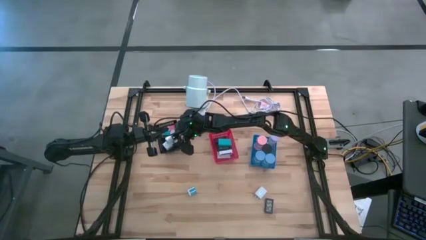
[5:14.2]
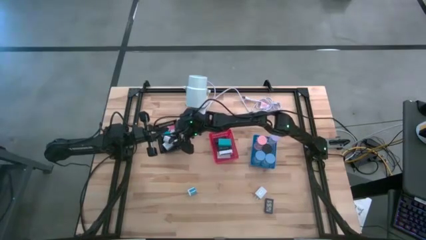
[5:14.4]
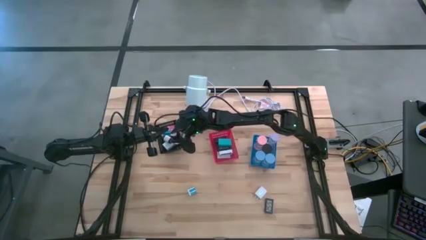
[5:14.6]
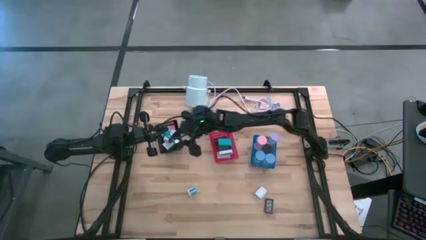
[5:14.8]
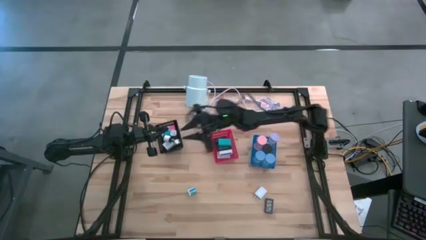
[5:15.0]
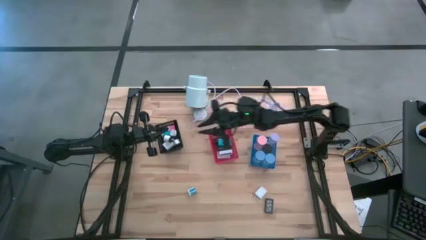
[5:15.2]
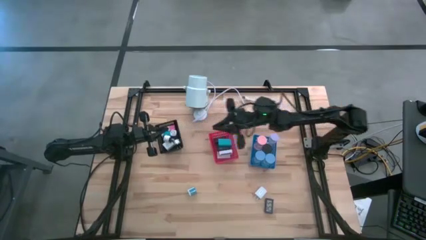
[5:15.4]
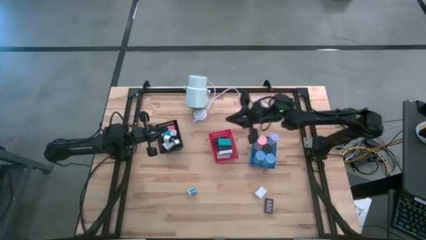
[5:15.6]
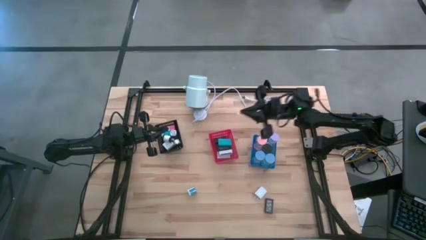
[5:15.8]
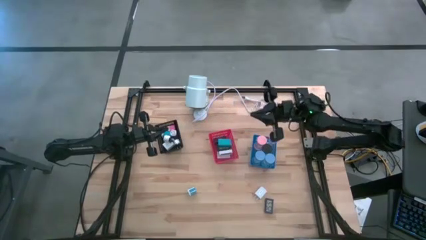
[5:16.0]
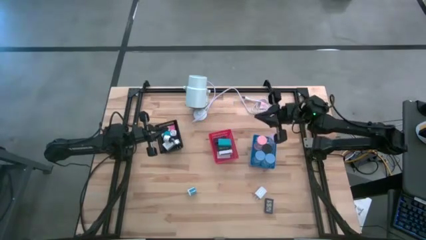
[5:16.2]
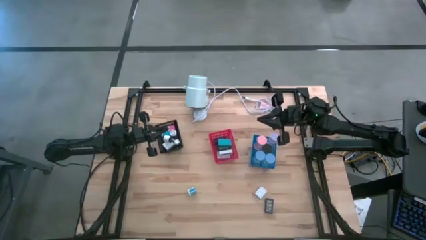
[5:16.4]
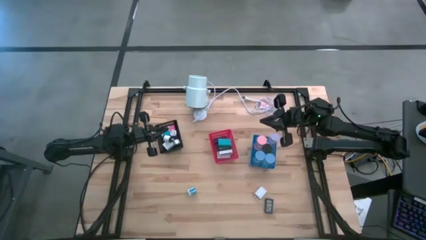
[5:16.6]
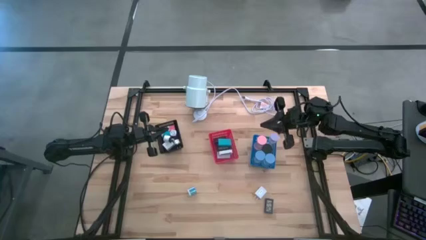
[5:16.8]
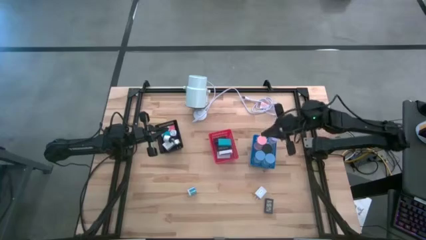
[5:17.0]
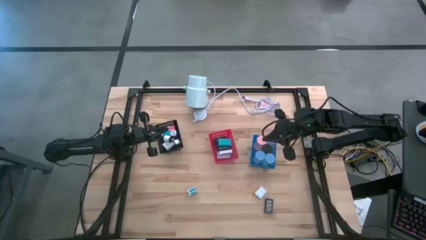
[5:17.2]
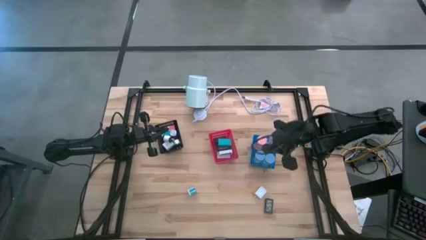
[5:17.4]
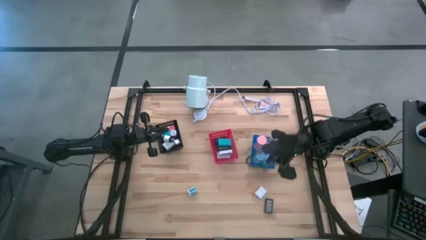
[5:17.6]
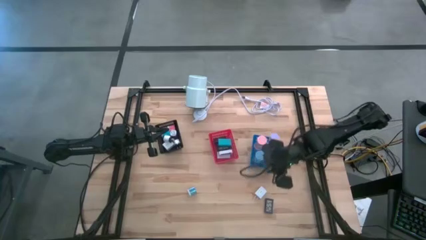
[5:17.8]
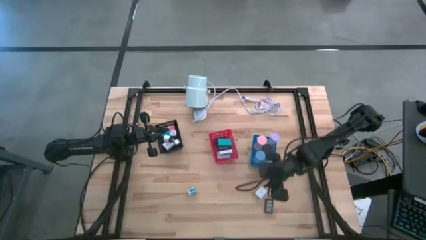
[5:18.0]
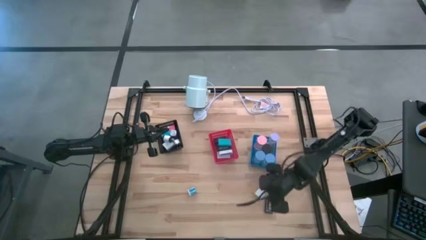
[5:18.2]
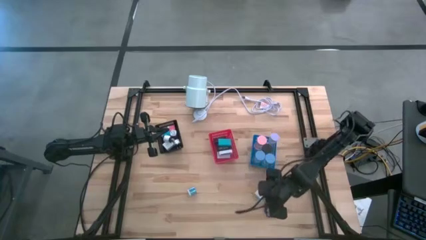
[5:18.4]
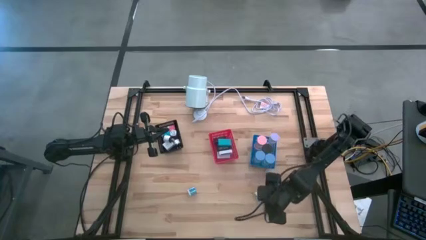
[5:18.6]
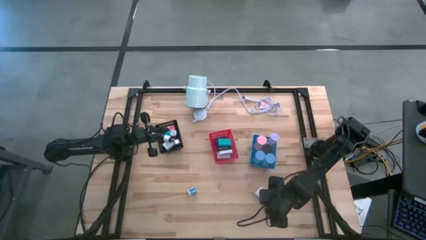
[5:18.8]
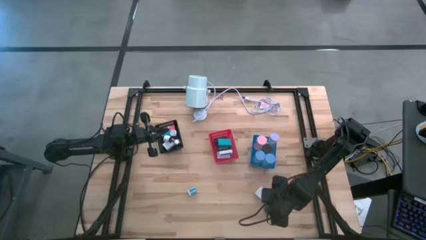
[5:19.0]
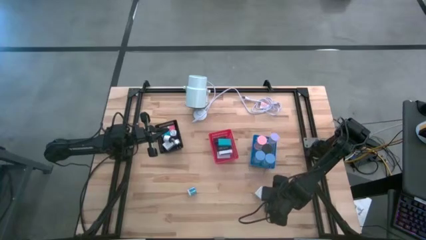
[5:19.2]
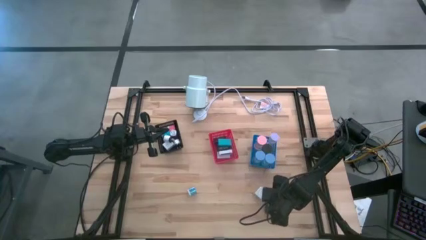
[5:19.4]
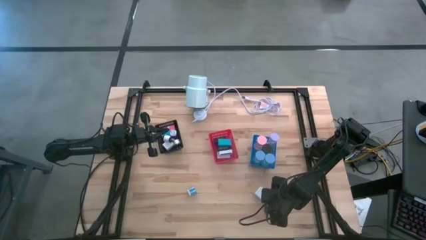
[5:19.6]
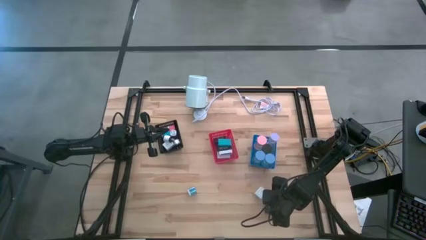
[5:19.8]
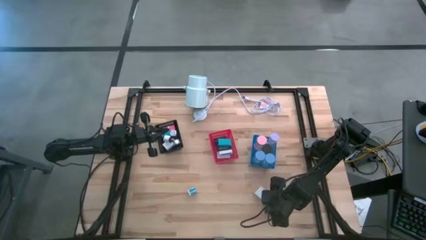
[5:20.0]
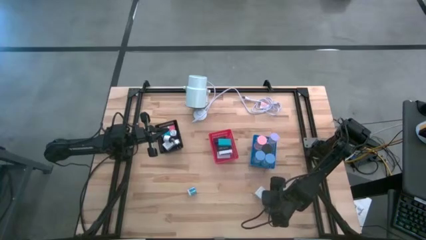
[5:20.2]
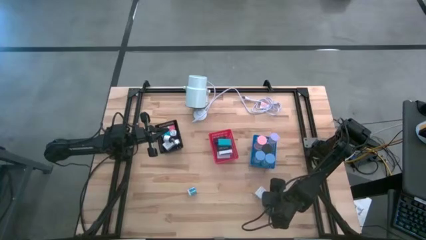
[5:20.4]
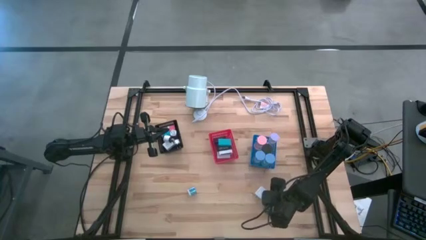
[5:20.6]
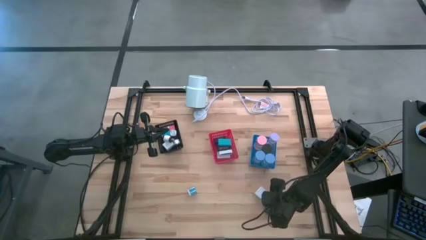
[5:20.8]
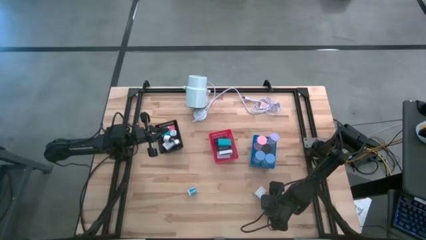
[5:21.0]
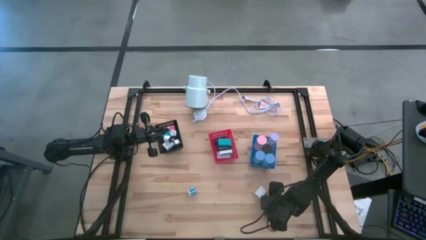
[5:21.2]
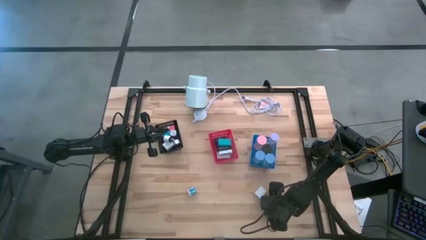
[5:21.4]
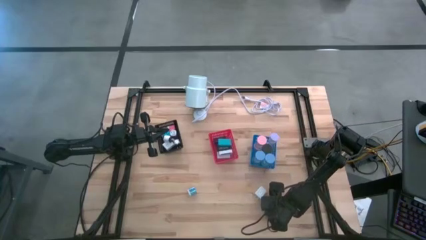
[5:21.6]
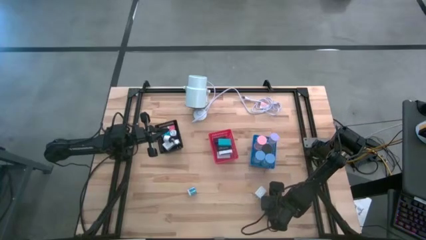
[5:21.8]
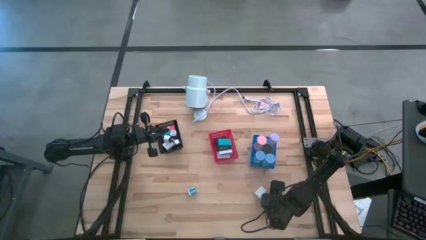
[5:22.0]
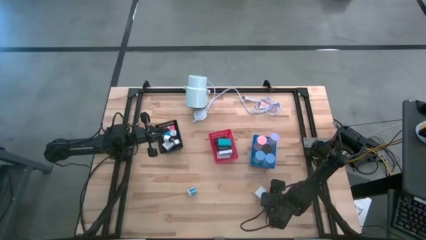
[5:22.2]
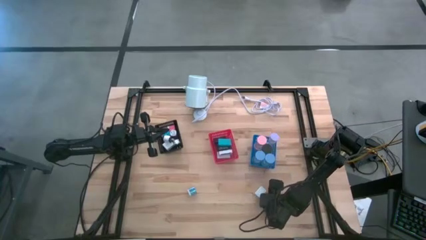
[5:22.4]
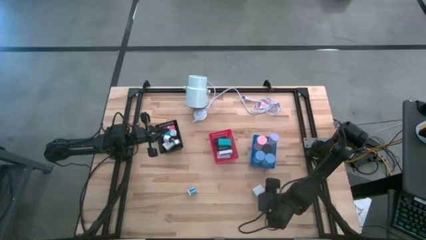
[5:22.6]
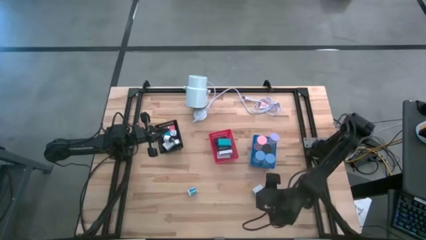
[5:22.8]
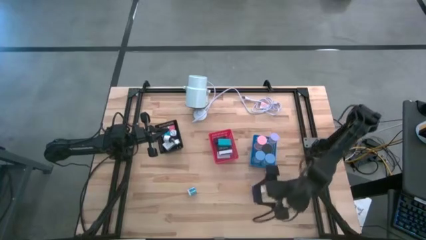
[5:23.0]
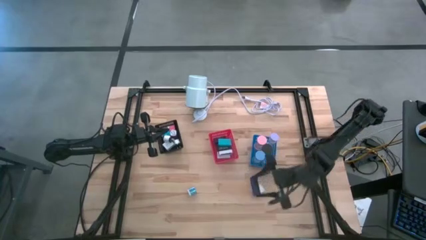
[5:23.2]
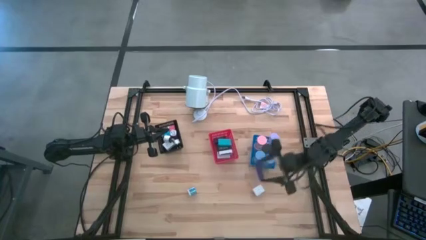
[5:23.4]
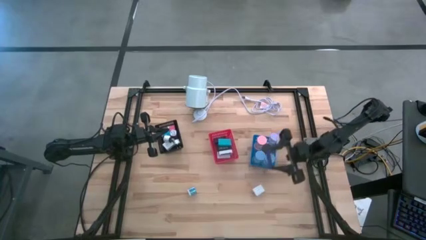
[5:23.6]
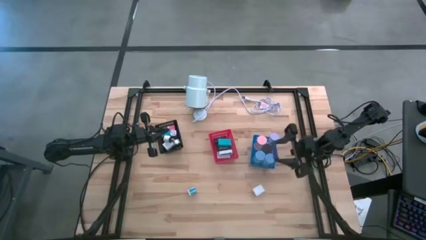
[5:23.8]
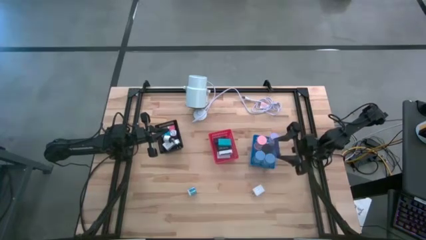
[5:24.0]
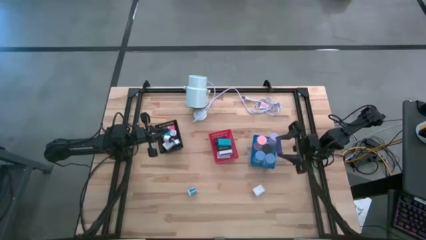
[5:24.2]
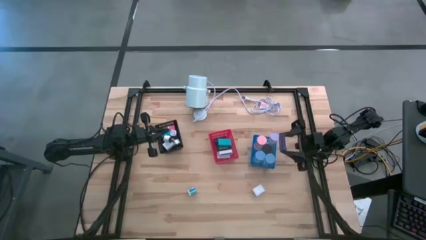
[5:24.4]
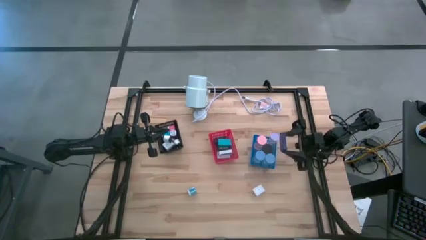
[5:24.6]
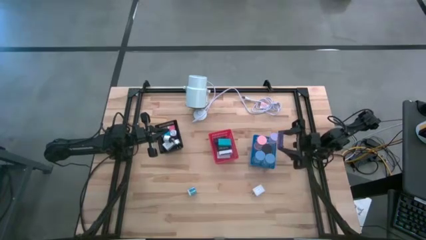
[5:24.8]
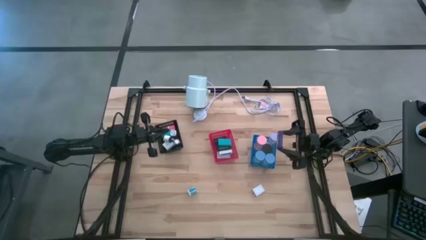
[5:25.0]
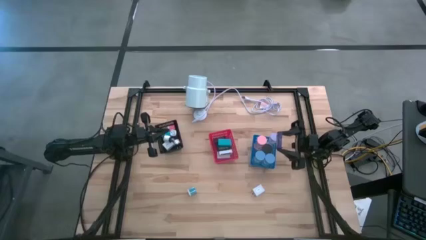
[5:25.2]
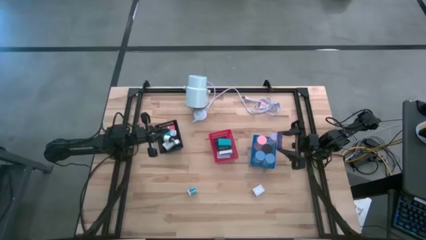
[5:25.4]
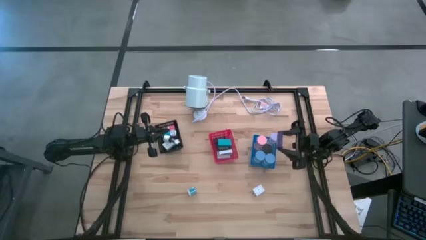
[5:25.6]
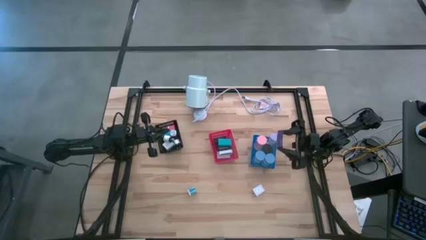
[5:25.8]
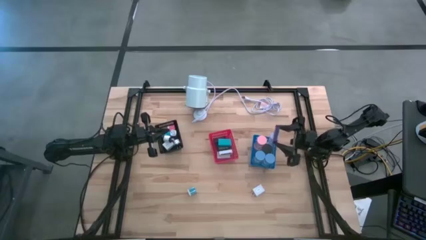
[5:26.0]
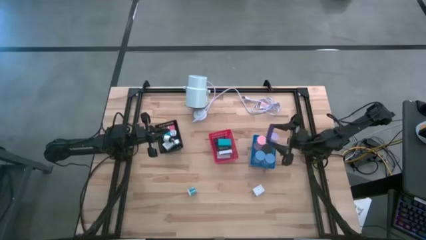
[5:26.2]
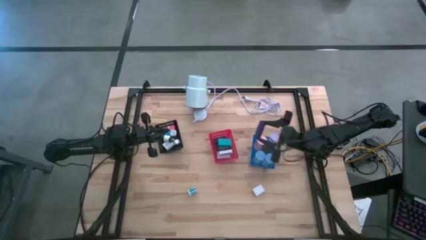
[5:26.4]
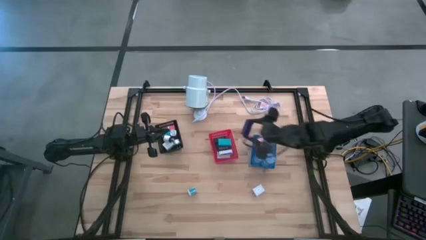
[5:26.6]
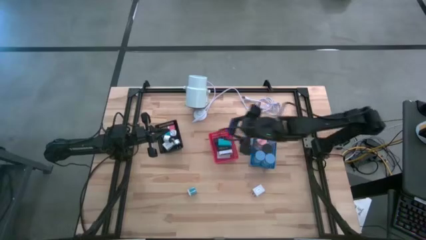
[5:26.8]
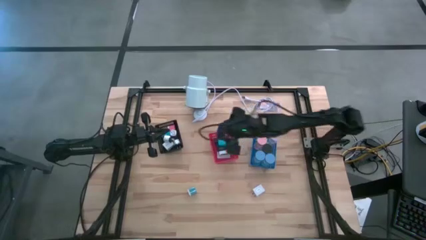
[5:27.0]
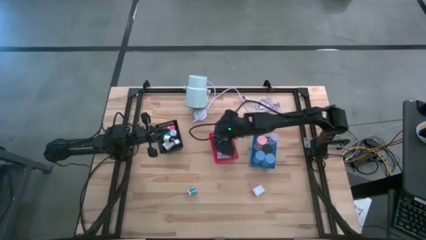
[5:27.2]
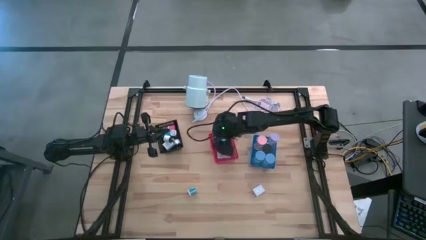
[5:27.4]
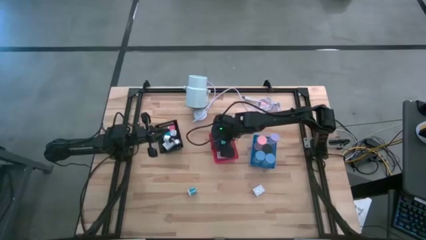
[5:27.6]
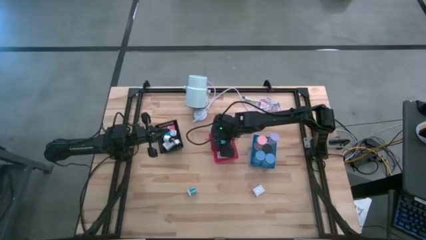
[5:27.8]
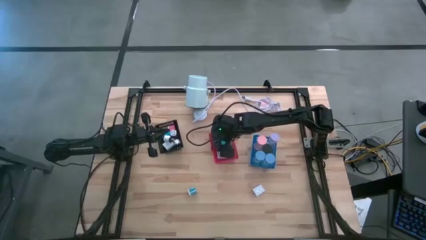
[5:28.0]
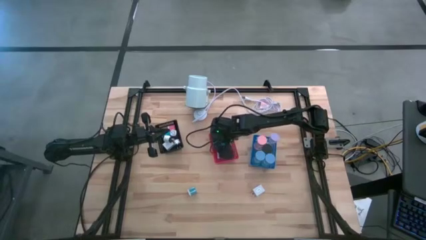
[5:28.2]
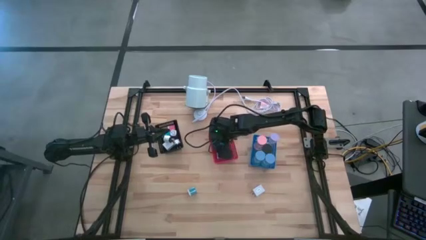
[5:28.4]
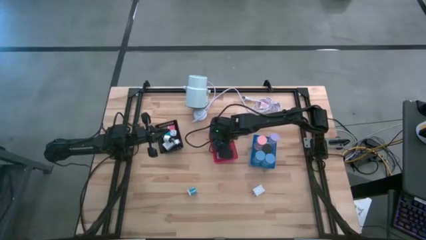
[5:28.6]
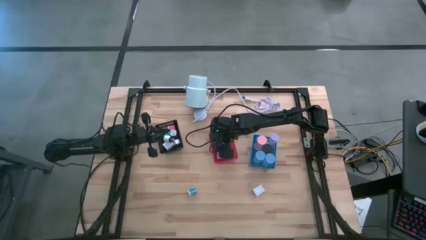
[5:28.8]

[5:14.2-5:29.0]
Task: Pick & Place Office items
Put the blue digital clock into the red bin

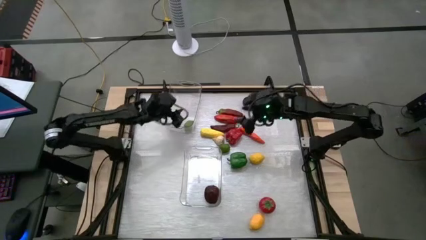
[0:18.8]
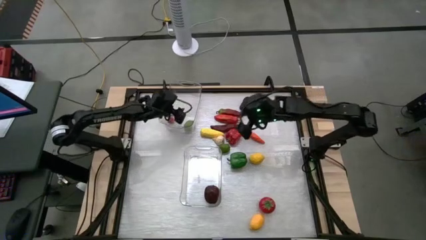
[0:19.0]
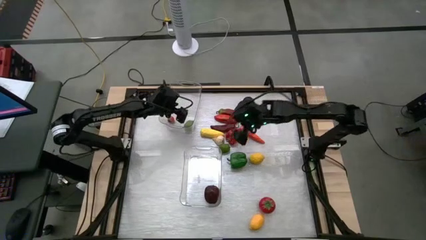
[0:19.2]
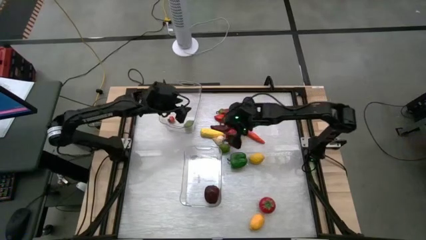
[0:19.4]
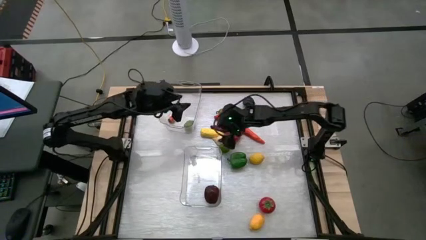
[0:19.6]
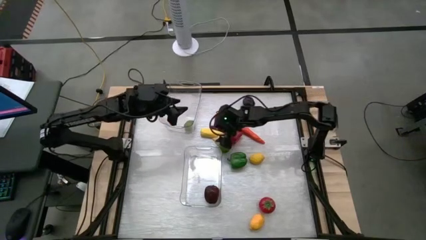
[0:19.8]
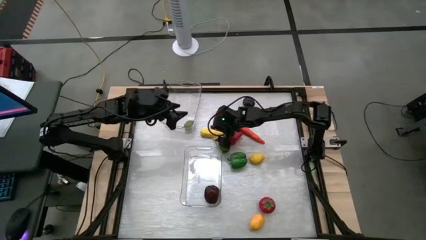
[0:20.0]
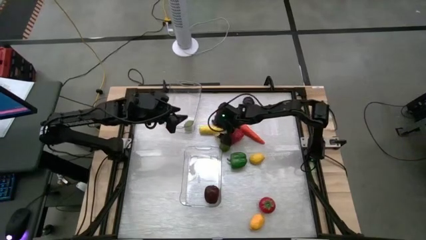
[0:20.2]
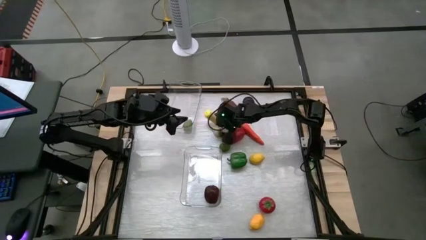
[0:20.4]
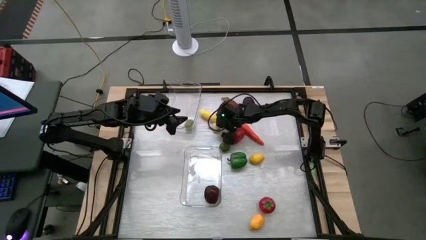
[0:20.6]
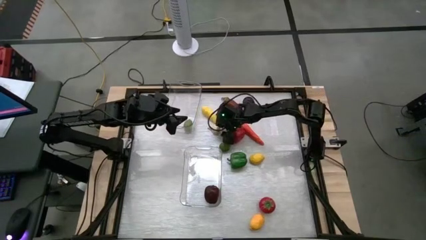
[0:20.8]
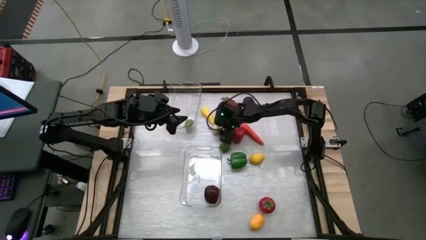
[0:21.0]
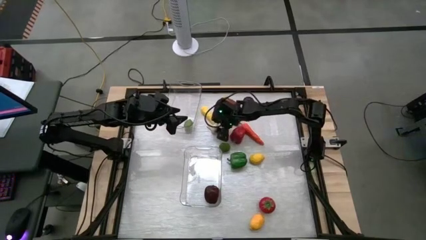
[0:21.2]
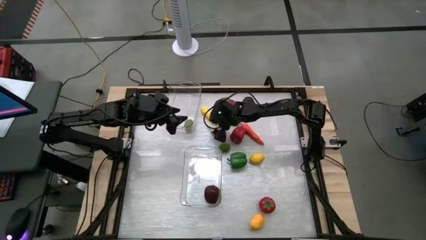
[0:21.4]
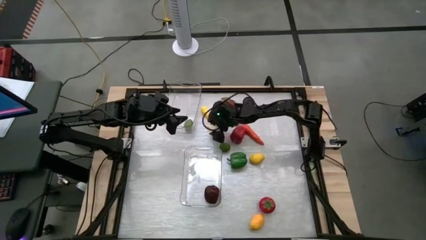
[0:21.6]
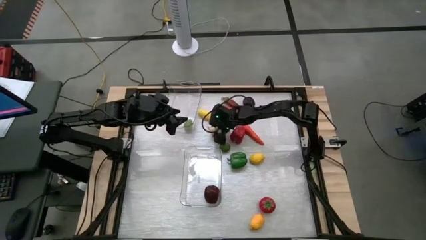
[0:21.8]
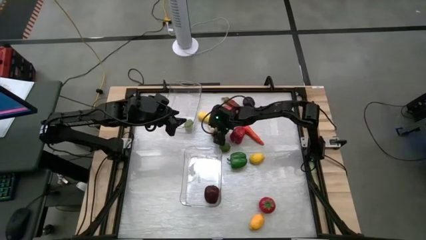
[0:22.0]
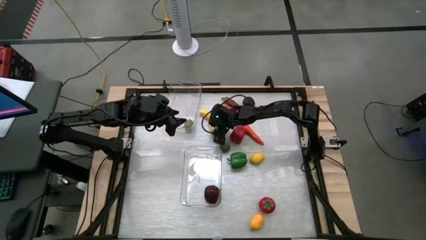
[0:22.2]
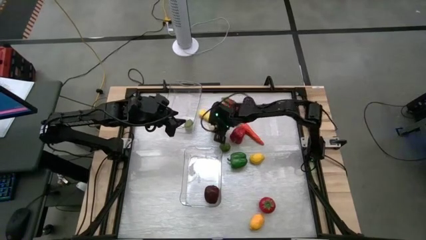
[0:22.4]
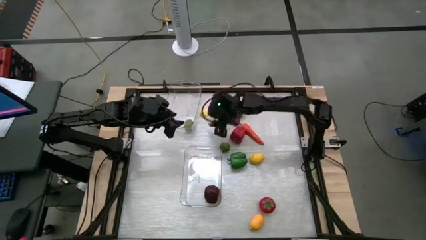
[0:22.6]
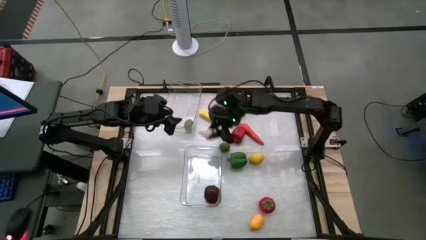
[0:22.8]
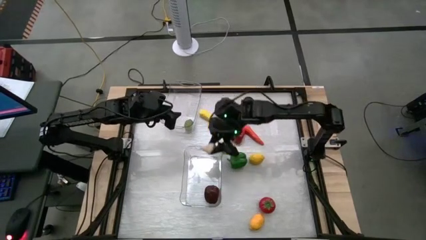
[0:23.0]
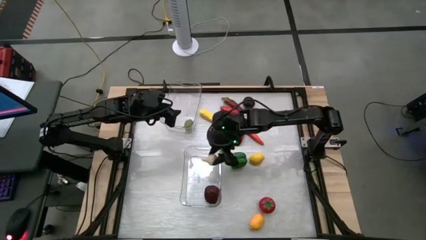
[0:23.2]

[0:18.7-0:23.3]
Task: Sort produce into baskets
Put the white garlic into the bottom transparent bin
